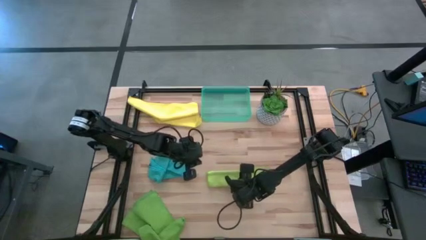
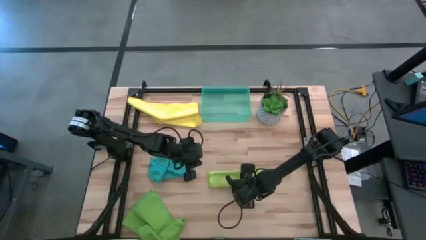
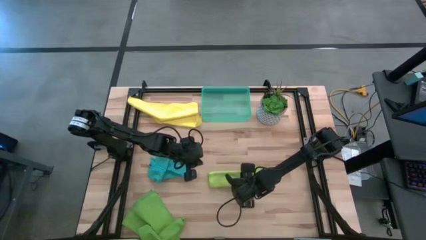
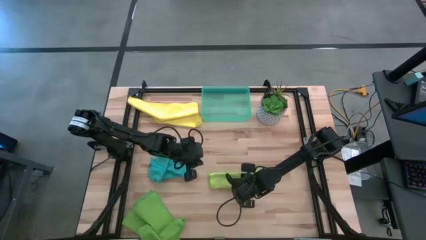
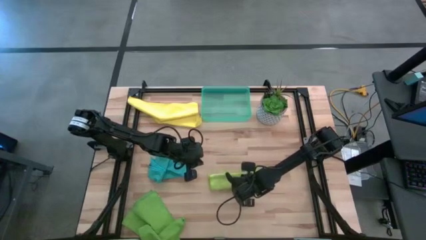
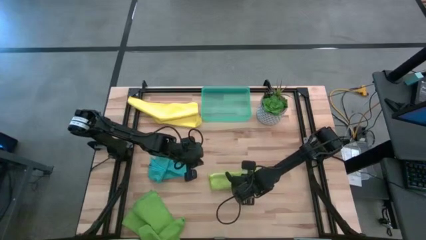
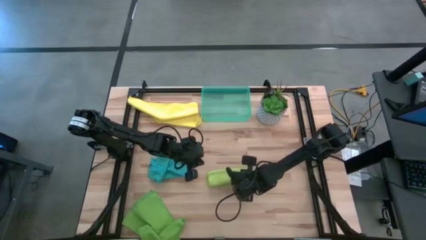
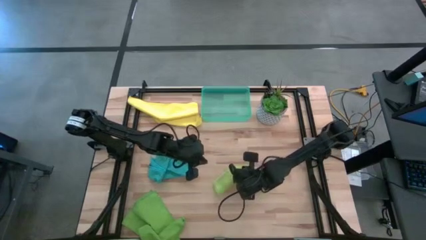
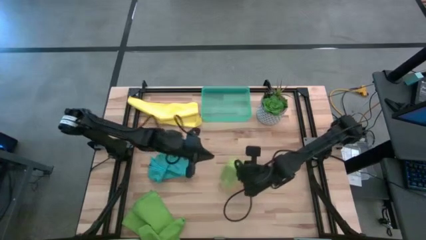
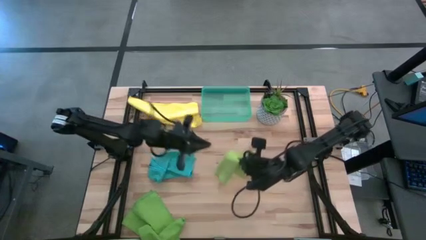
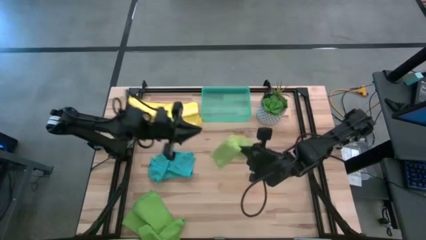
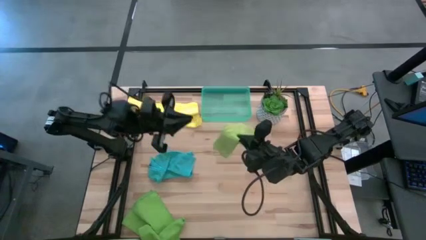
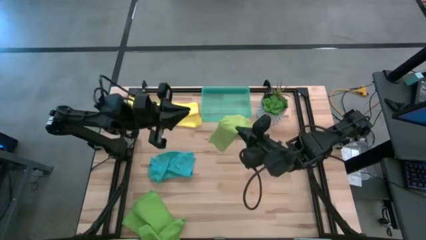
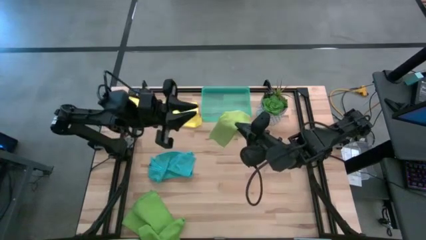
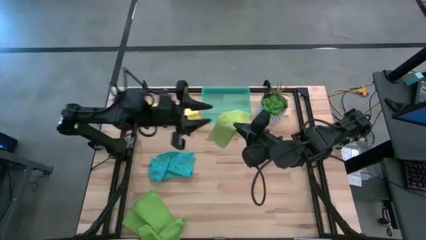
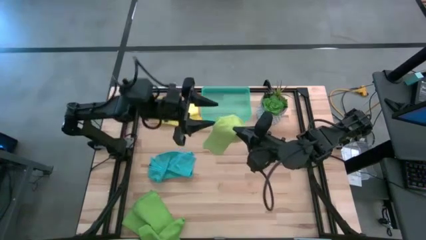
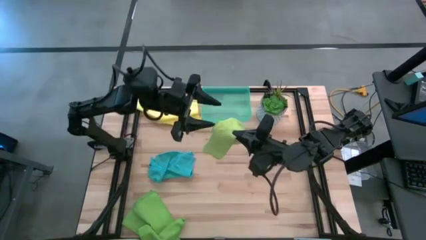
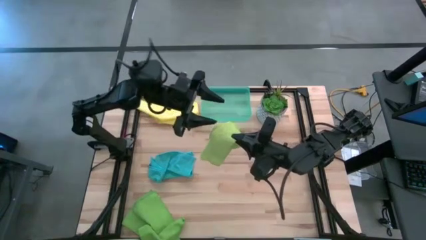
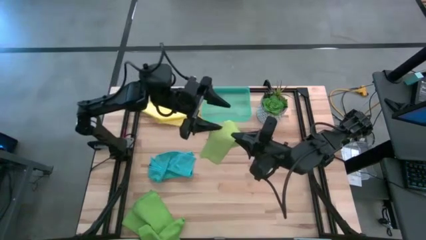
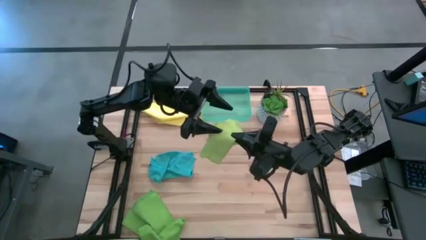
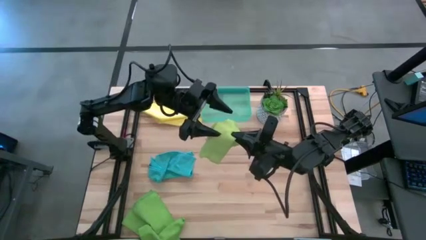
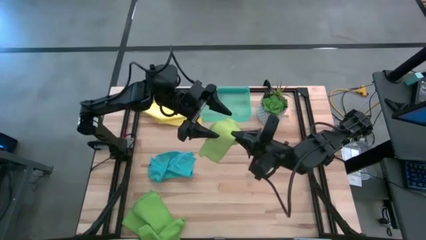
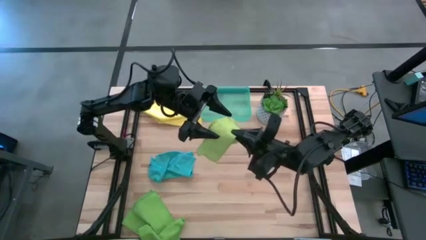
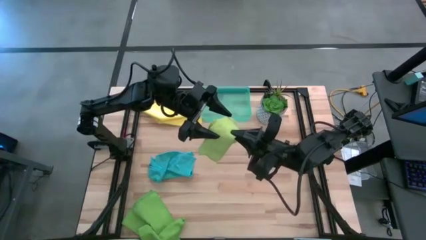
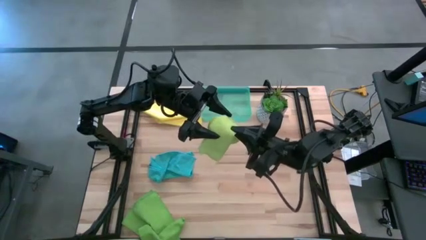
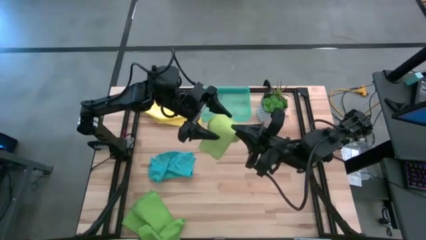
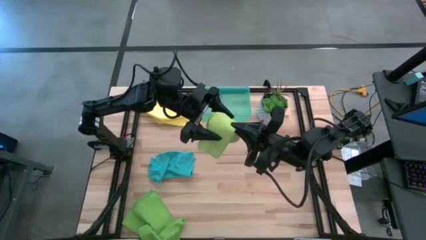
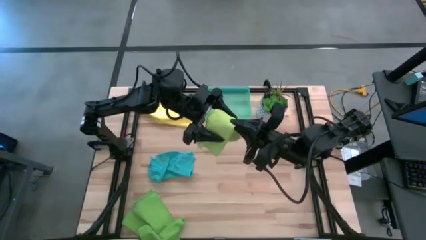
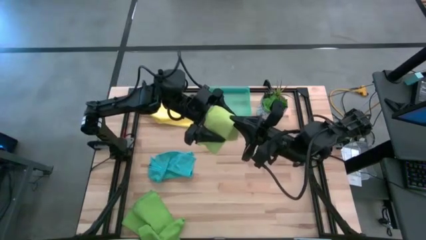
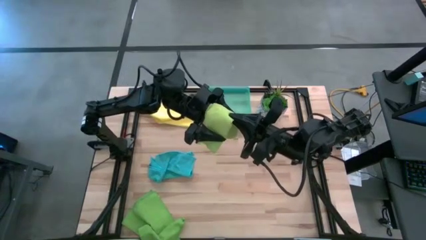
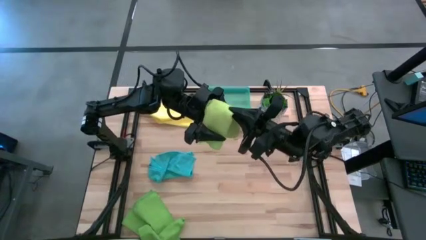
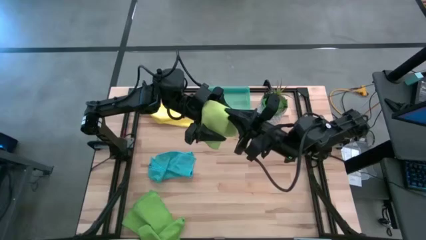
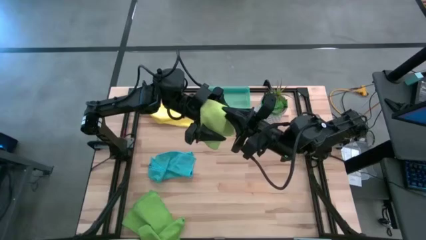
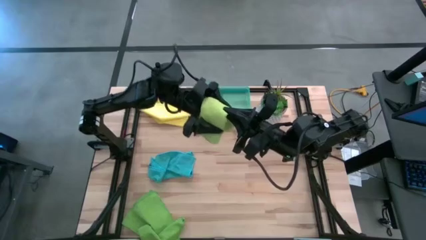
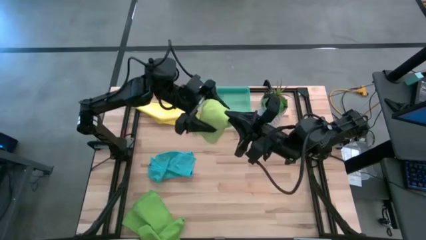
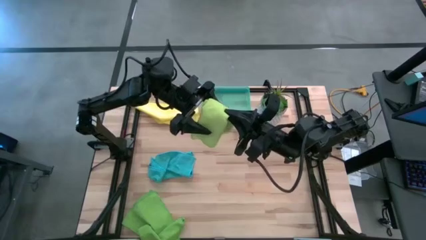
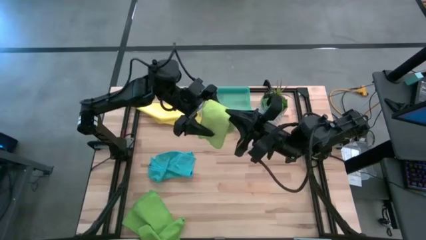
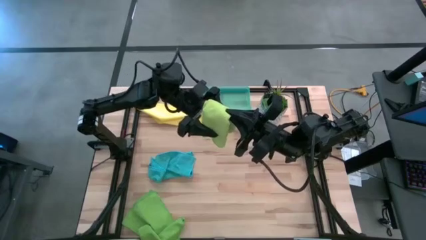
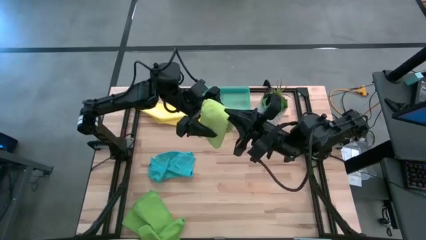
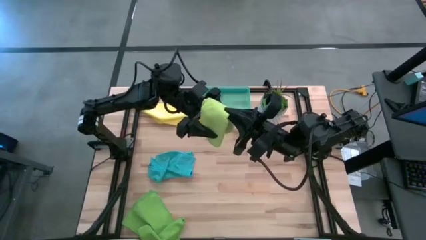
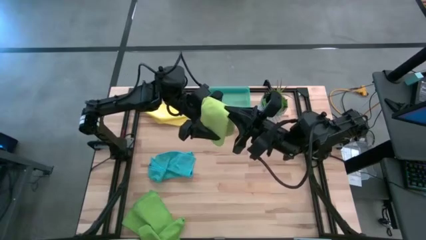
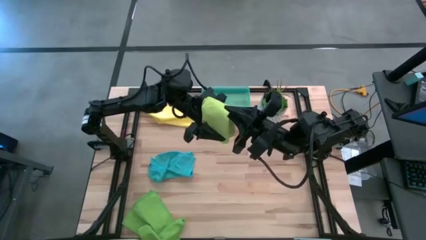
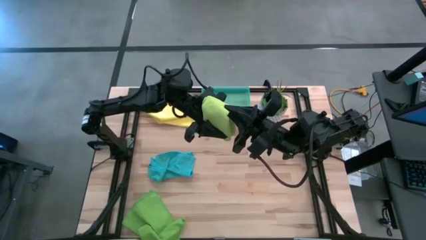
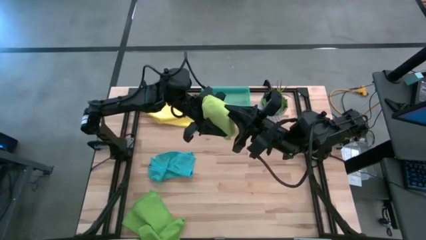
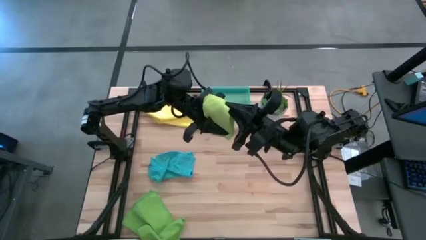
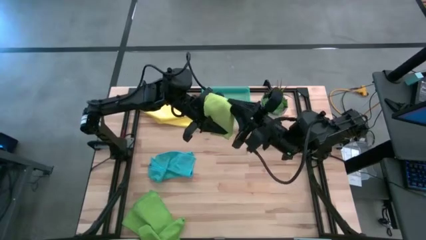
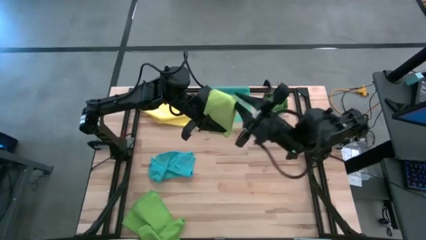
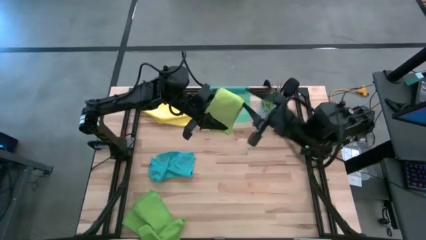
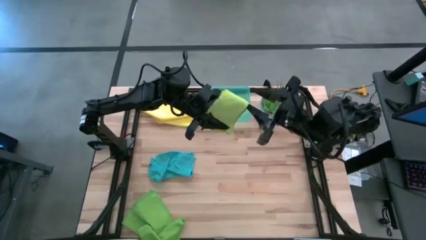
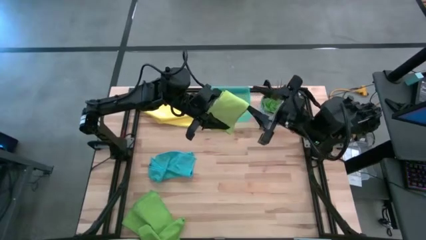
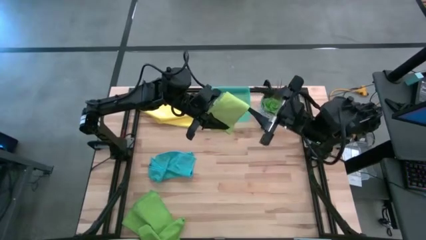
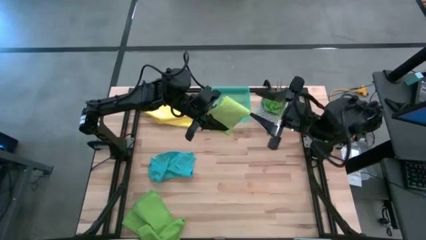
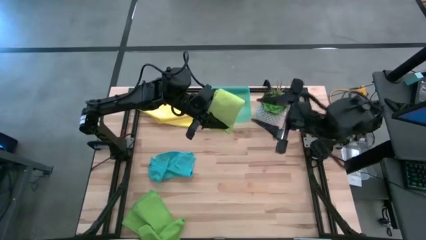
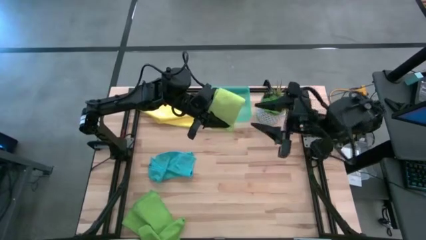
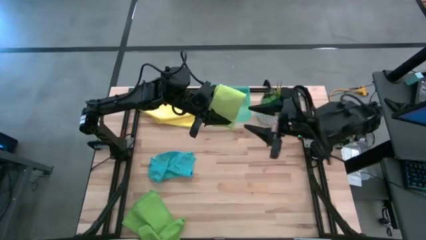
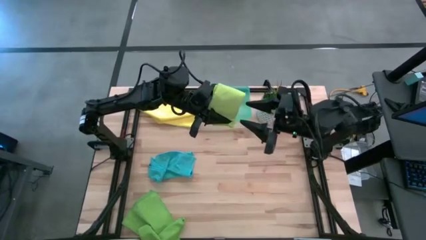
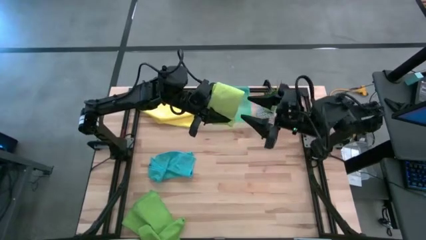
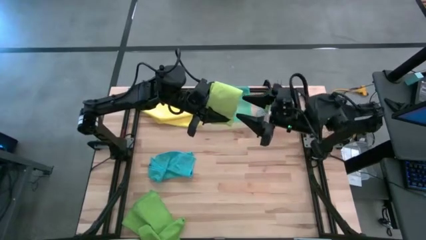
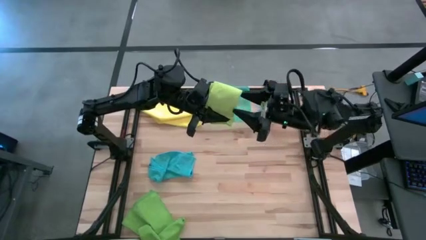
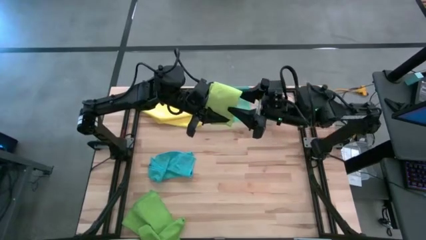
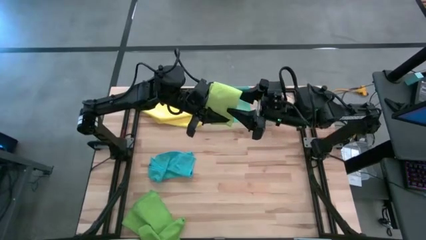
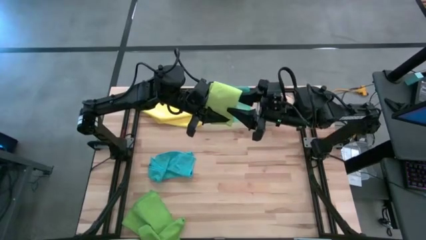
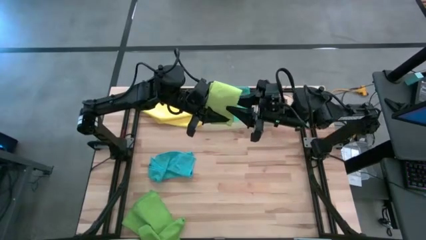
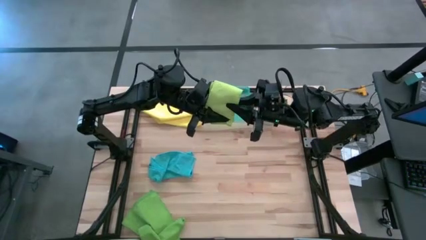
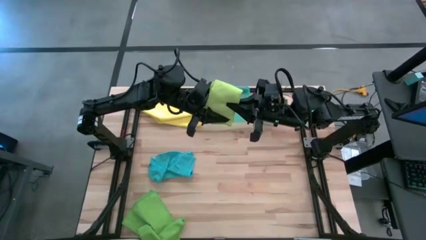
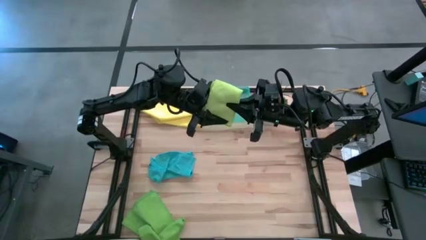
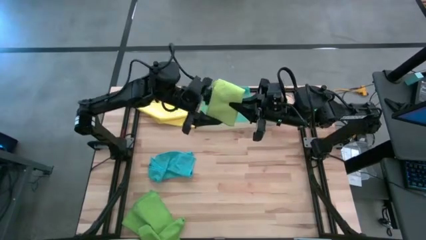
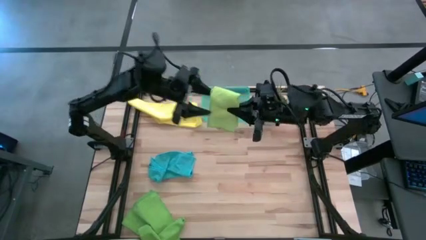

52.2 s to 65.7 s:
Task: Fold microfiber towels
Fold the light green microfiber cloth

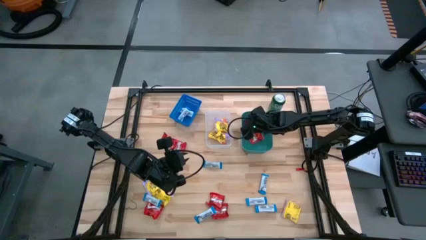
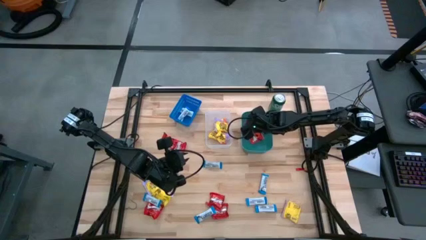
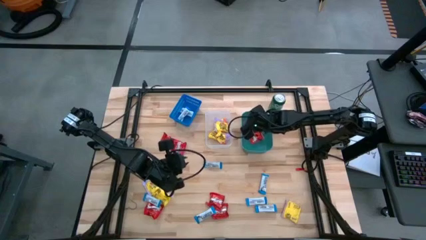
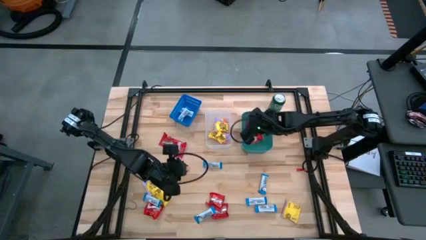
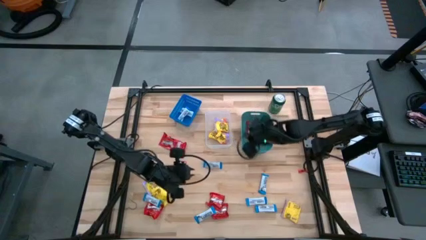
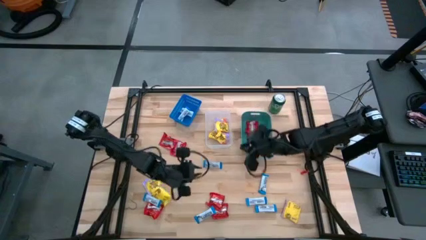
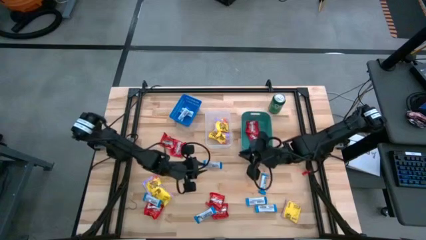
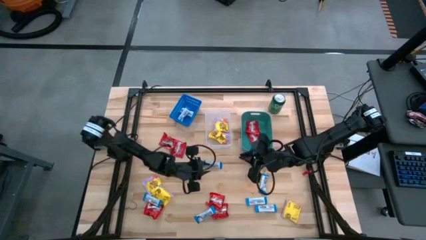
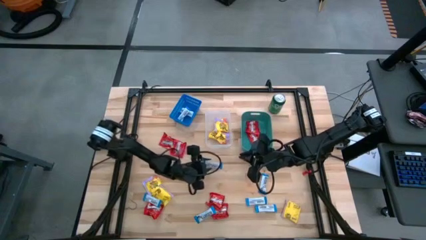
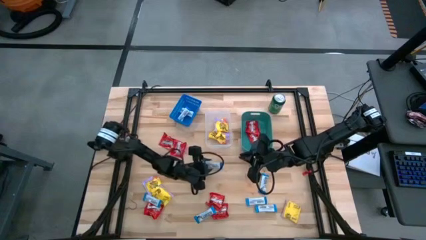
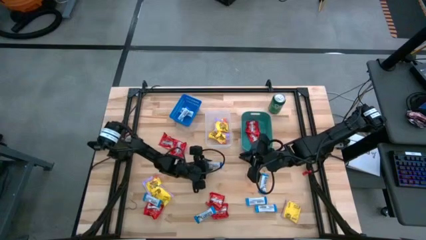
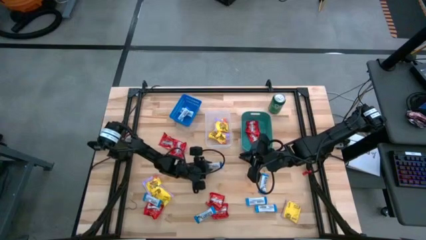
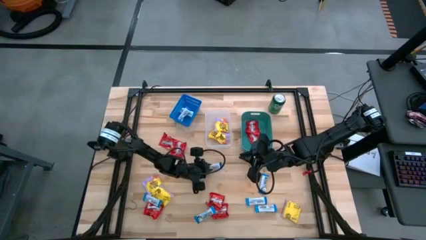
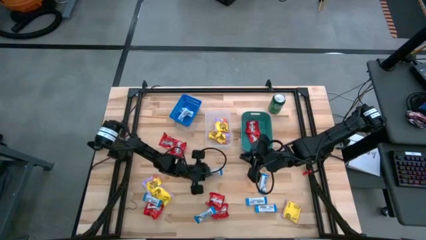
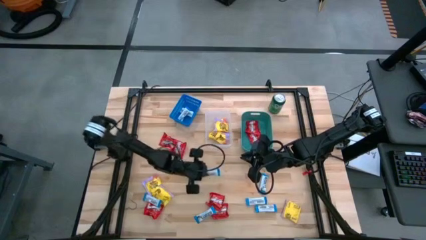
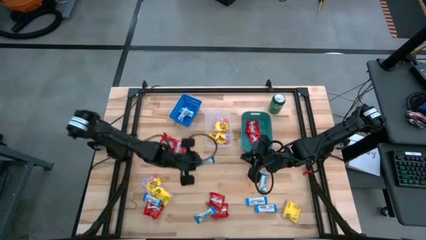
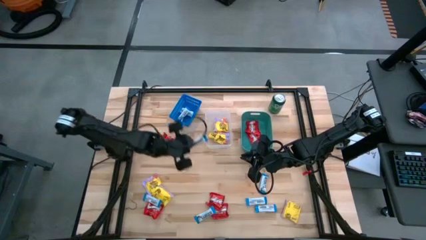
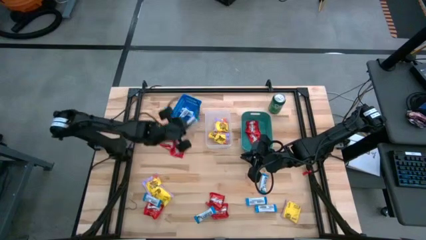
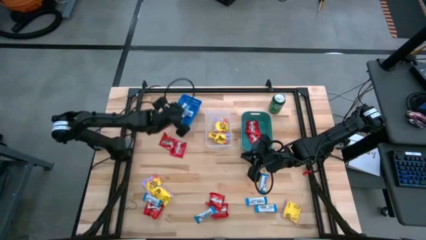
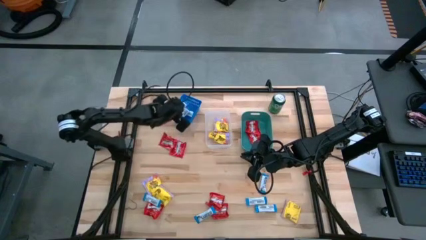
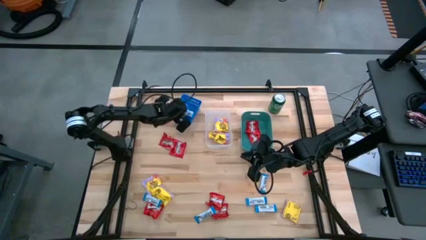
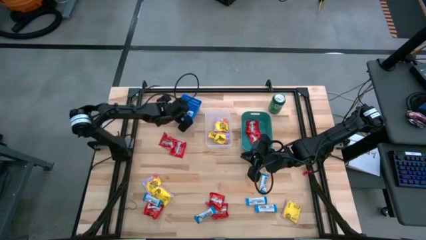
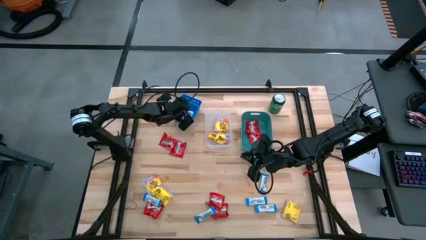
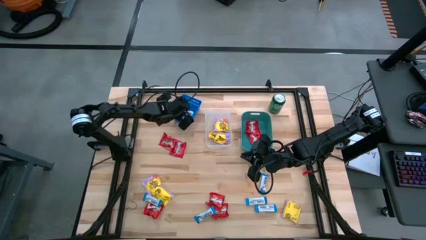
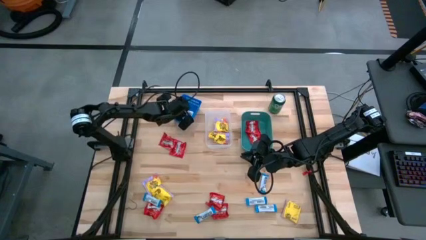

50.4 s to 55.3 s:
Task: Sort candy
Put the white chocolate bar into the blue bin
